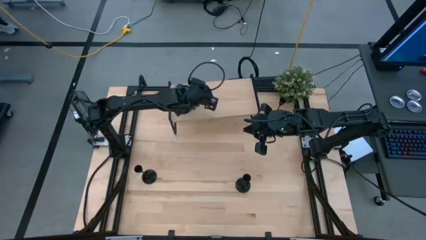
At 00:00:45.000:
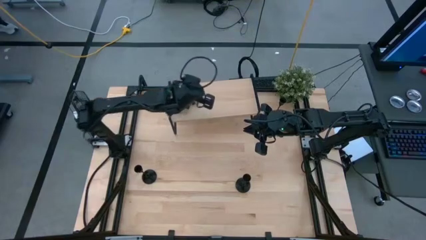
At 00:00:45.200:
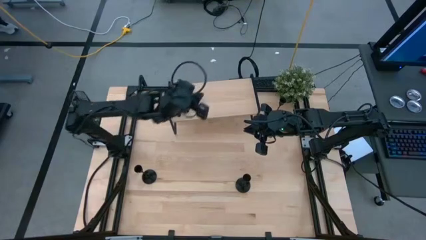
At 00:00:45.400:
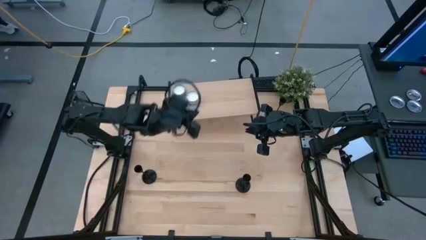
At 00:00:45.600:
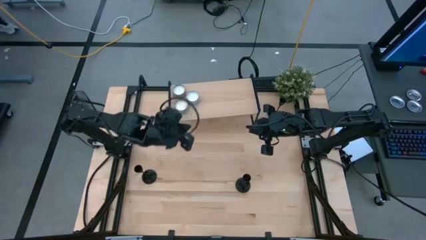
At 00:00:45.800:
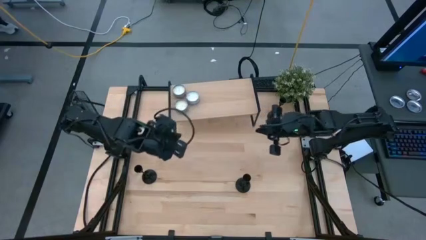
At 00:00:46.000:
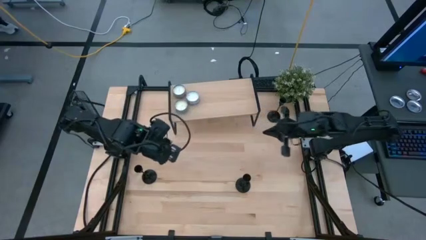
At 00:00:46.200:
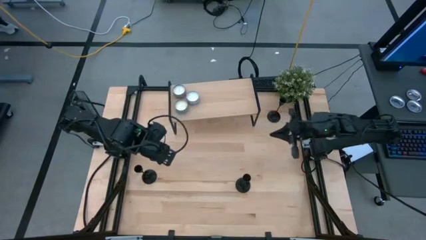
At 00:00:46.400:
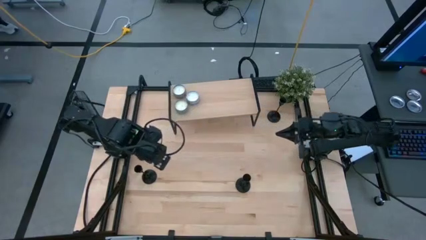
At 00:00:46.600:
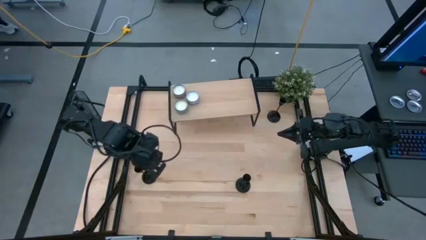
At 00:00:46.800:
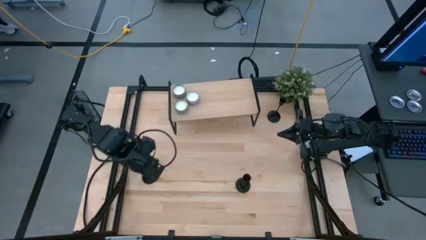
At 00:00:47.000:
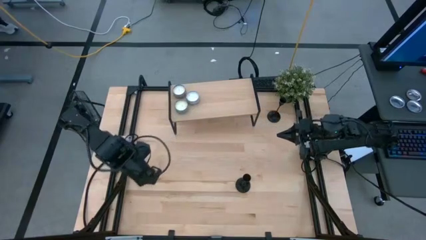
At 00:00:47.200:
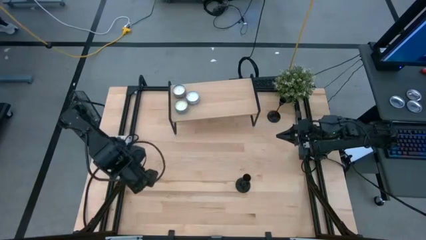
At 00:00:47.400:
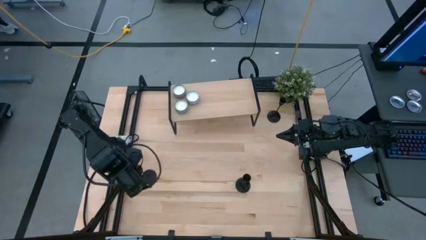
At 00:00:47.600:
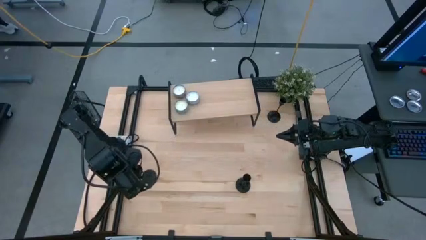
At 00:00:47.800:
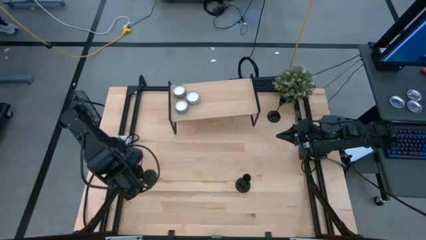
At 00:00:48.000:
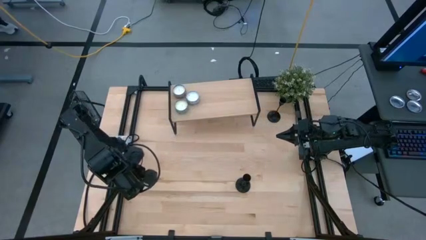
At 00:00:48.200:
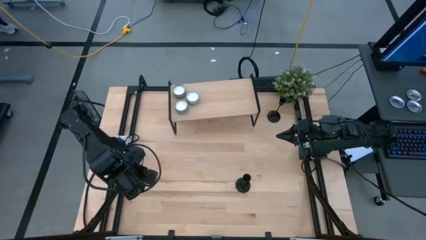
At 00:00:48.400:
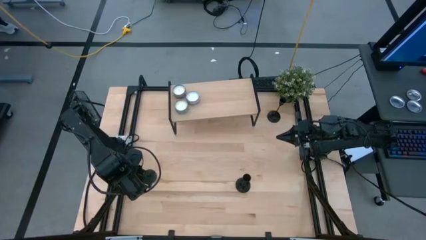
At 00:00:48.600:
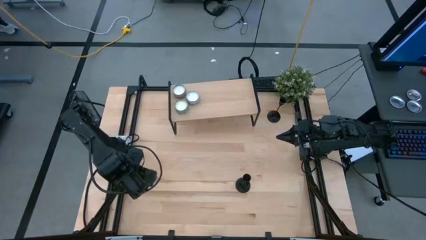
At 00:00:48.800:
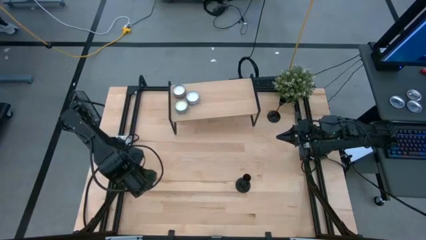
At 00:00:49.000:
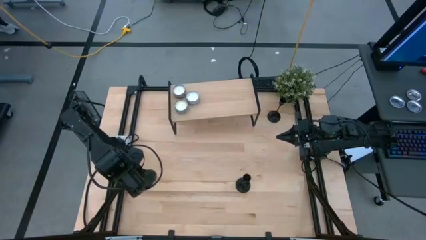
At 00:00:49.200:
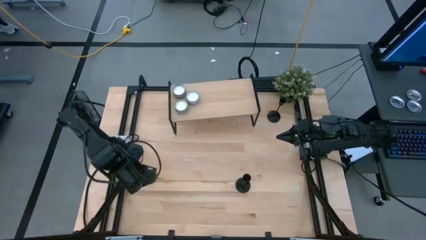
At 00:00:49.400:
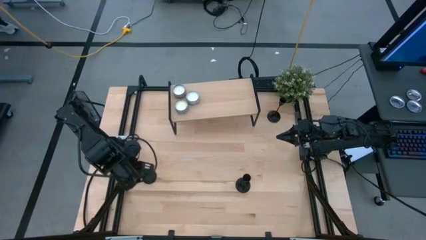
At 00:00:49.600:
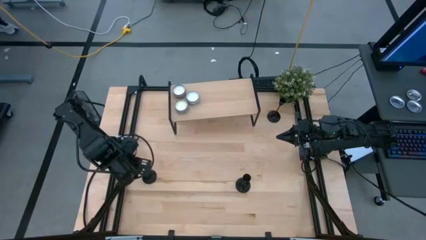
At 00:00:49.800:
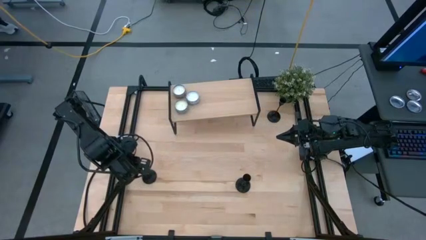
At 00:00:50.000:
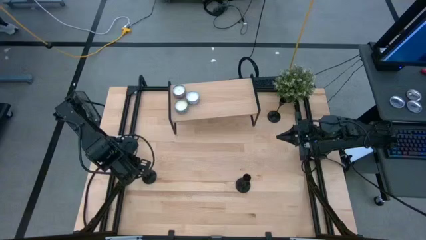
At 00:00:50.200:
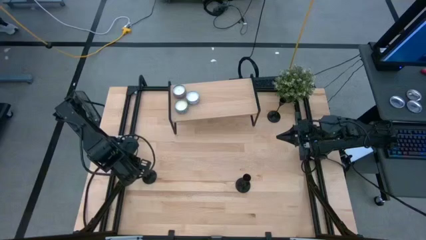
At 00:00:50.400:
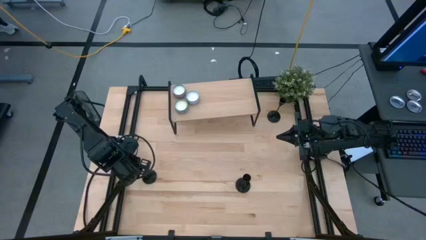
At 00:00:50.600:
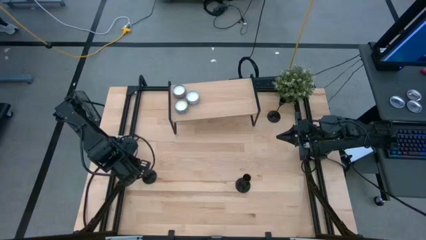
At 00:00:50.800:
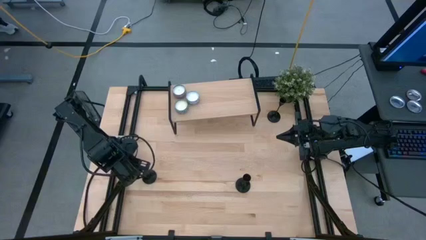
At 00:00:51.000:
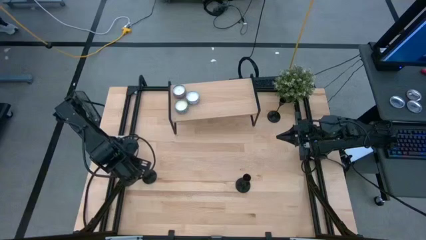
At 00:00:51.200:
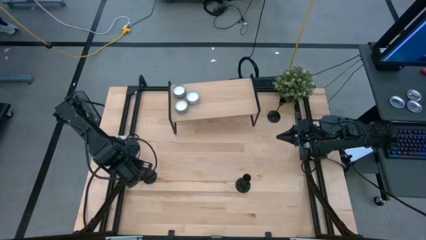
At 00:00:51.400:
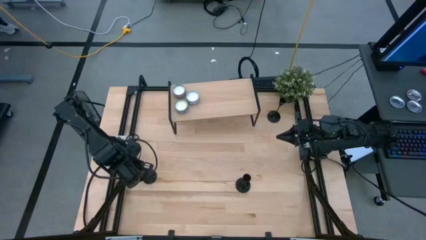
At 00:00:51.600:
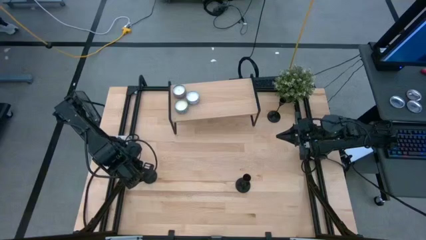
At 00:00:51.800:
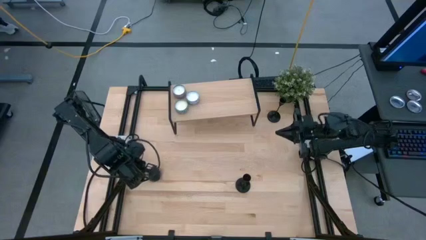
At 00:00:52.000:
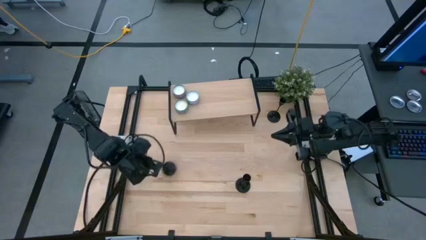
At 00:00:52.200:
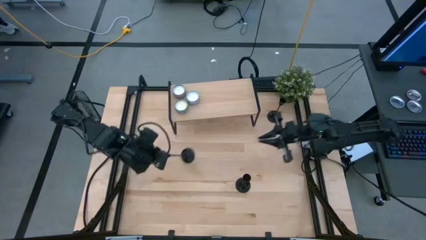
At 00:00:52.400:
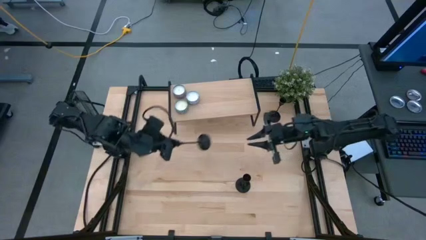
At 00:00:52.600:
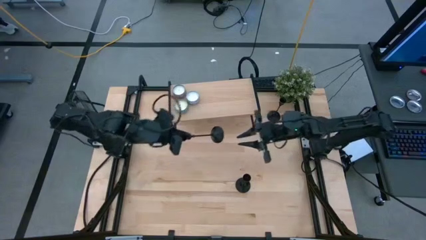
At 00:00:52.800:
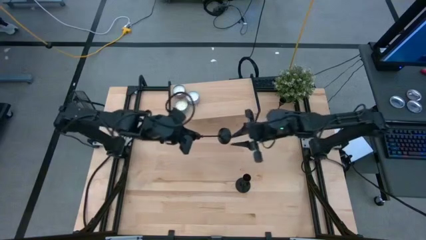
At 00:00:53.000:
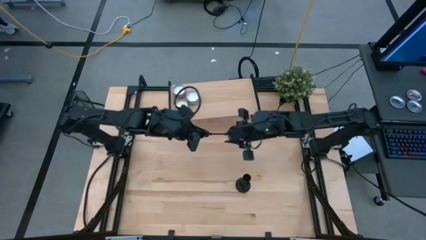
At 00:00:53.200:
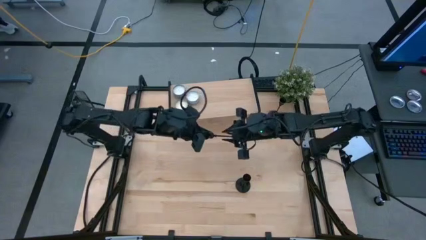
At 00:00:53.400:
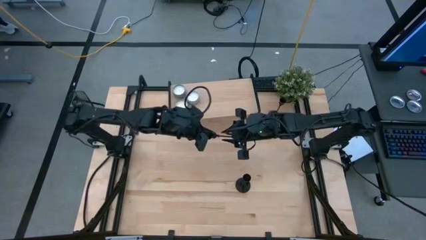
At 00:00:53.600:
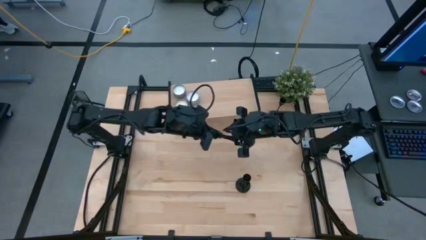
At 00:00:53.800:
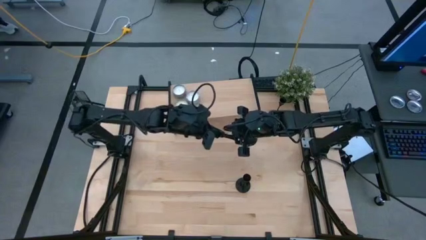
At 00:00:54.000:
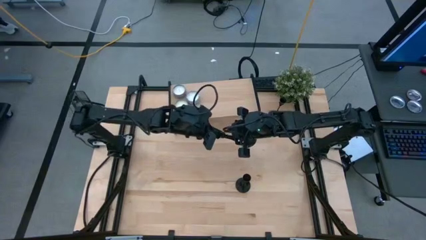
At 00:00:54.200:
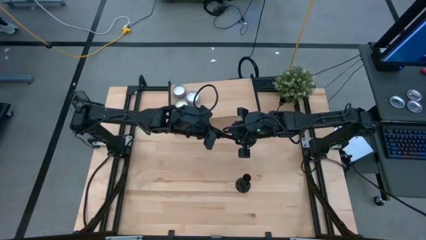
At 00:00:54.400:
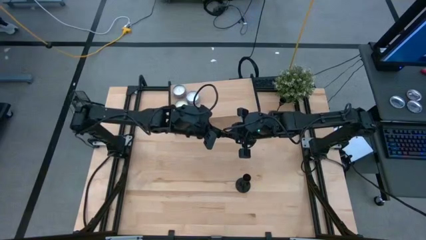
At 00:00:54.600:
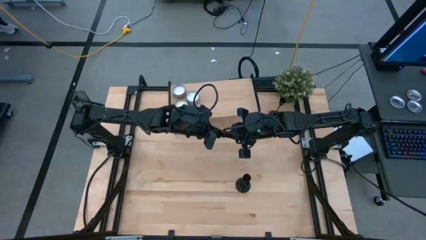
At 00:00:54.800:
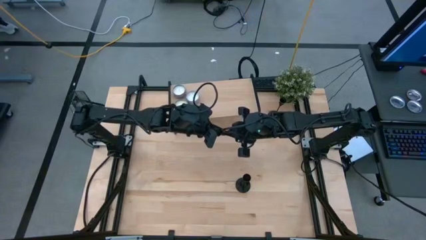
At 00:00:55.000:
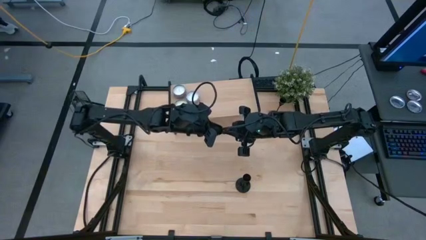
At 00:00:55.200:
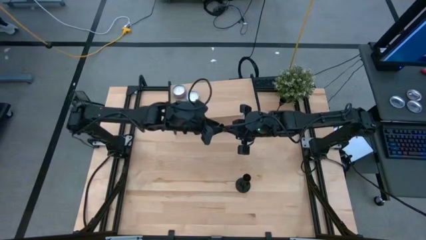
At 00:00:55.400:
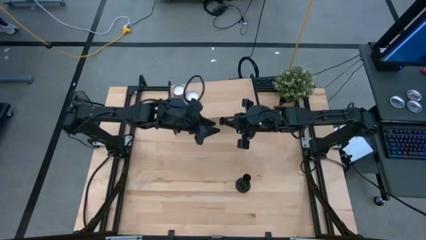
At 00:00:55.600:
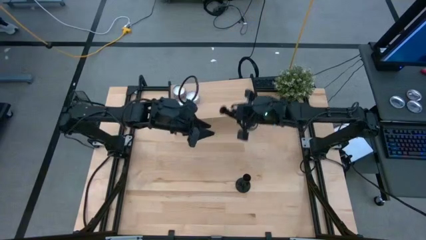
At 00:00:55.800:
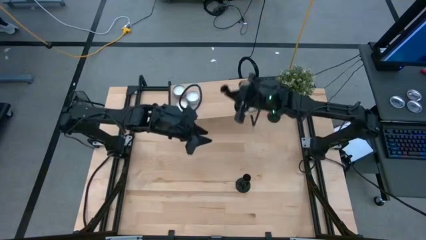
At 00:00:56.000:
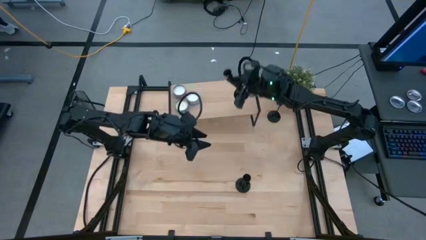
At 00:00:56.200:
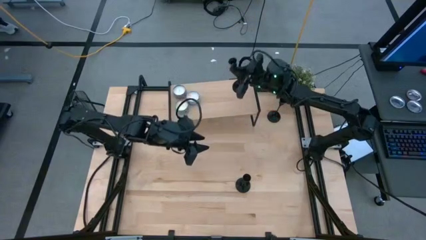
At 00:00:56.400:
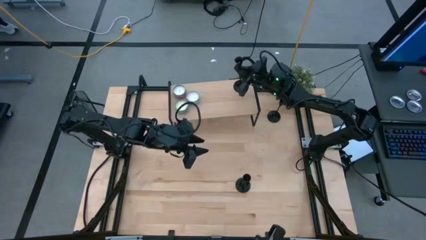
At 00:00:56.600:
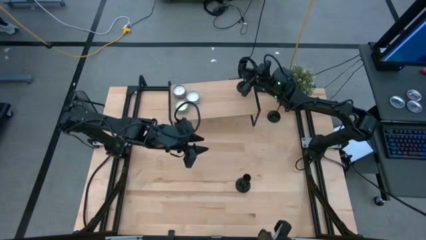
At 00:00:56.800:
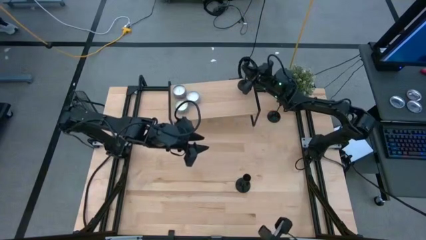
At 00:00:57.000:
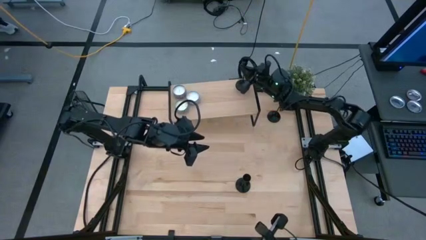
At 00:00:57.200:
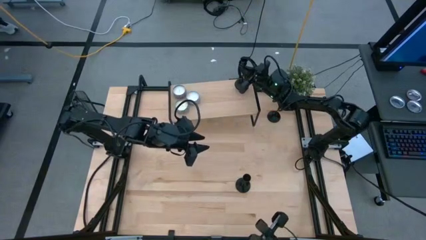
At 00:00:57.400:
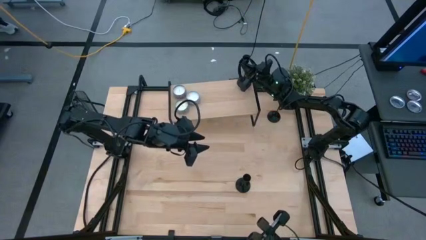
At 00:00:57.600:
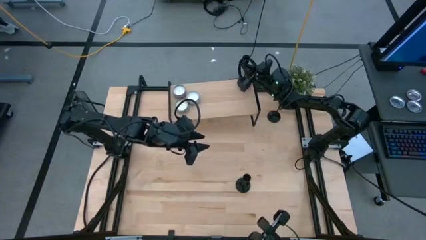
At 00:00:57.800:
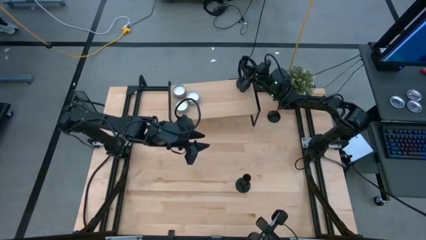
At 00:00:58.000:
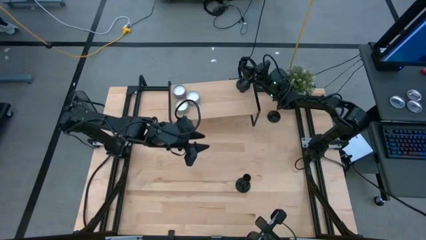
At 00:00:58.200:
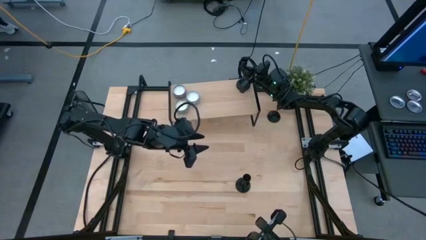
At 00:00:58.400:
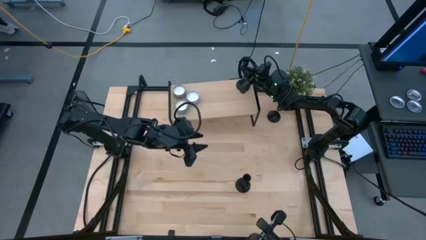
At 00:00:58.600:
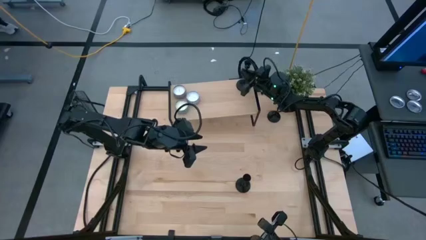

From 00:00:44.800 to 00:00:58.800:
Task: Pick & Place candle stick holders
Put the left black candle holder on the shelf
